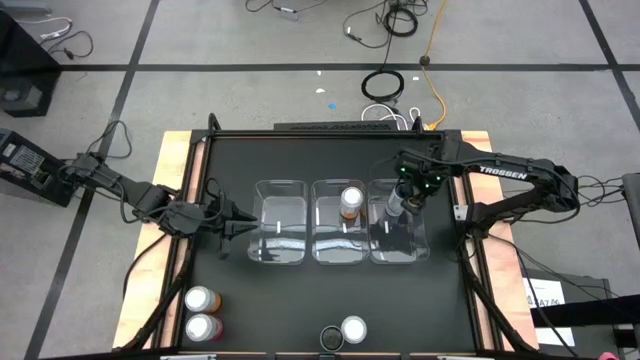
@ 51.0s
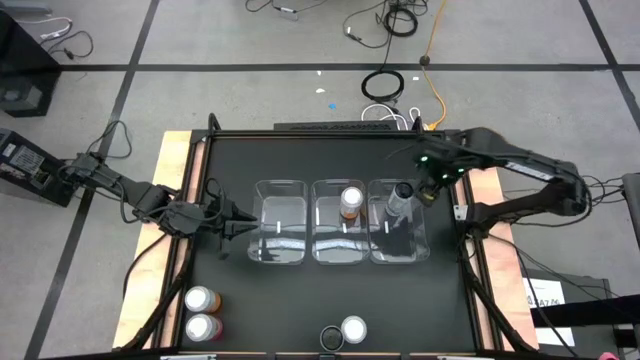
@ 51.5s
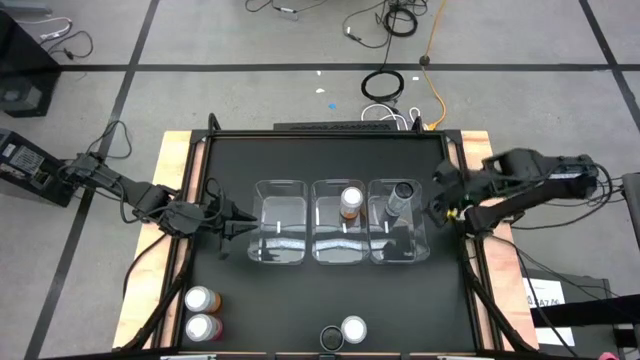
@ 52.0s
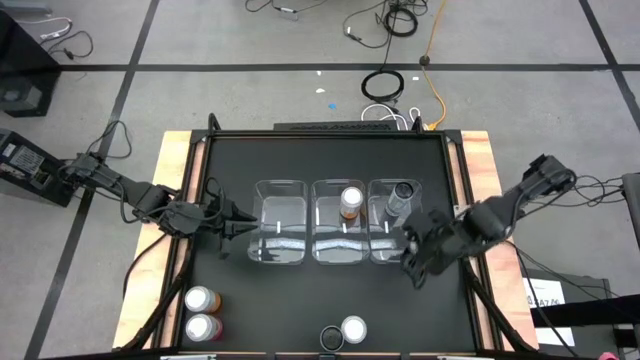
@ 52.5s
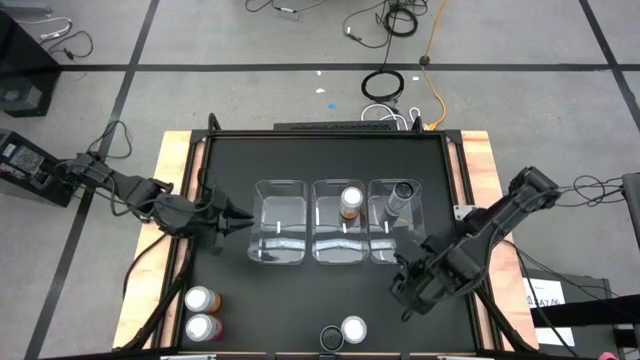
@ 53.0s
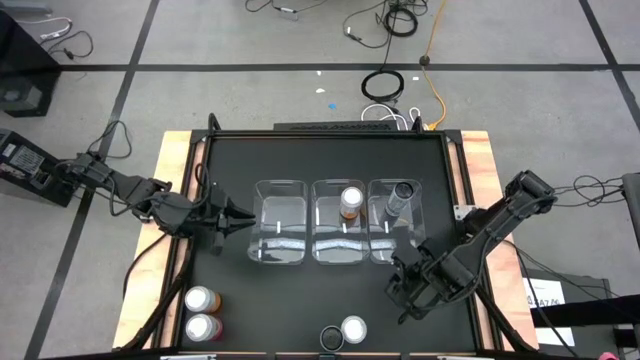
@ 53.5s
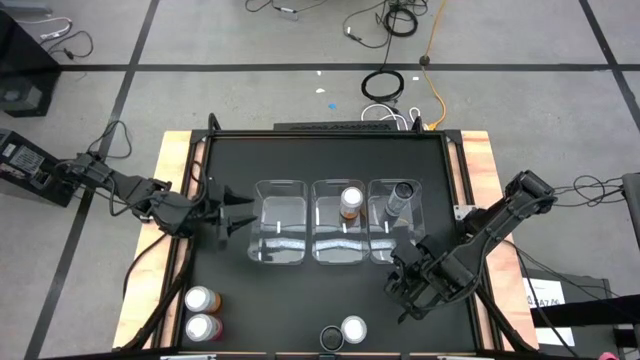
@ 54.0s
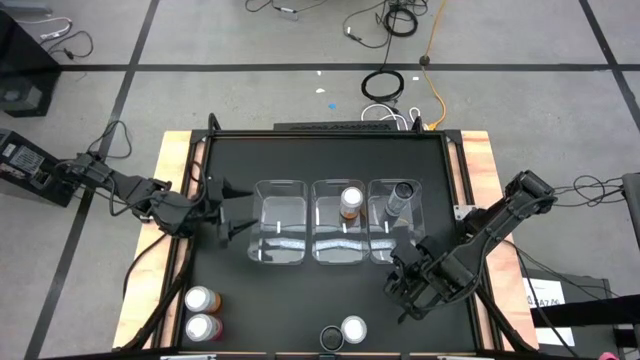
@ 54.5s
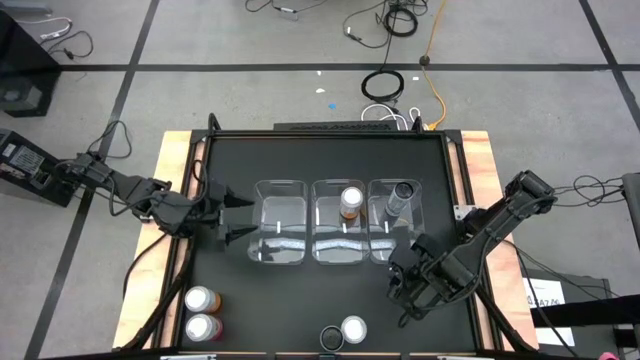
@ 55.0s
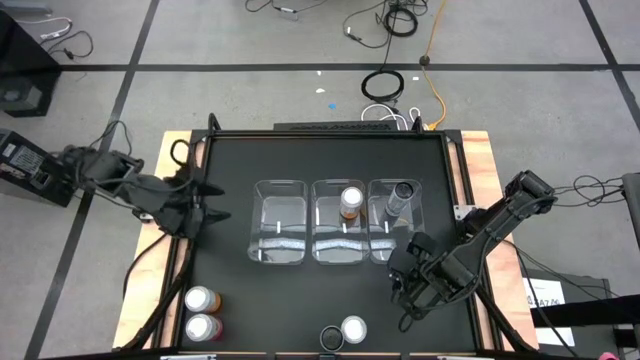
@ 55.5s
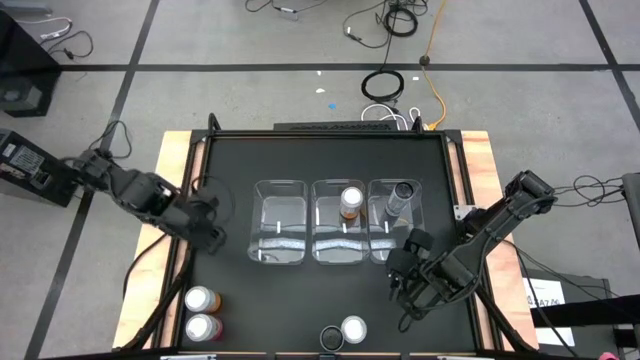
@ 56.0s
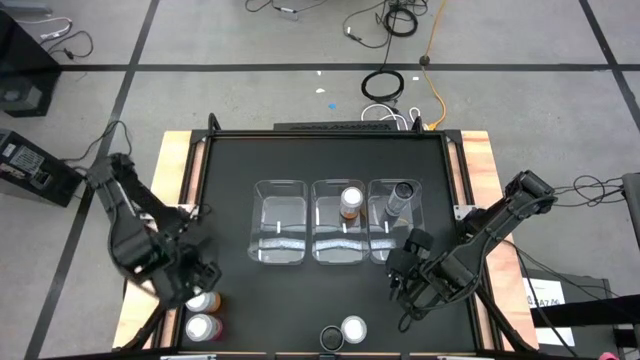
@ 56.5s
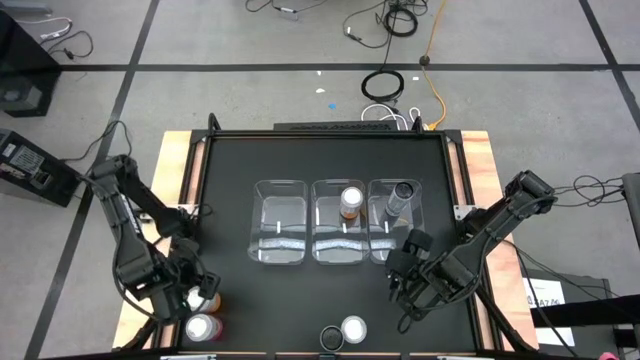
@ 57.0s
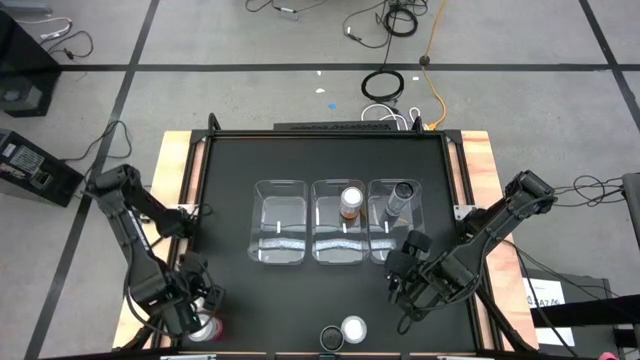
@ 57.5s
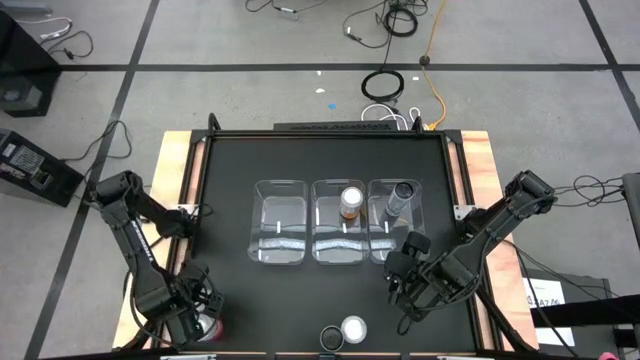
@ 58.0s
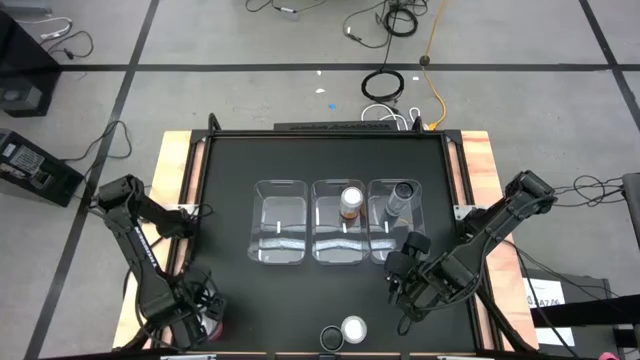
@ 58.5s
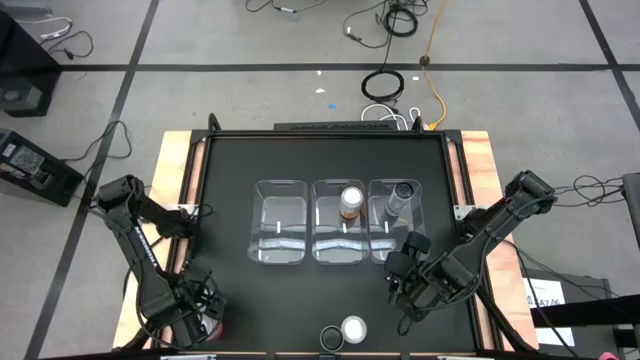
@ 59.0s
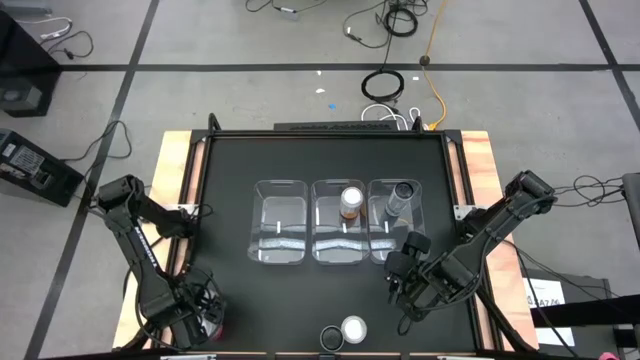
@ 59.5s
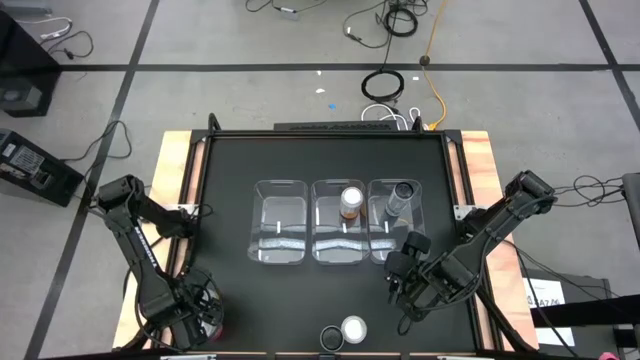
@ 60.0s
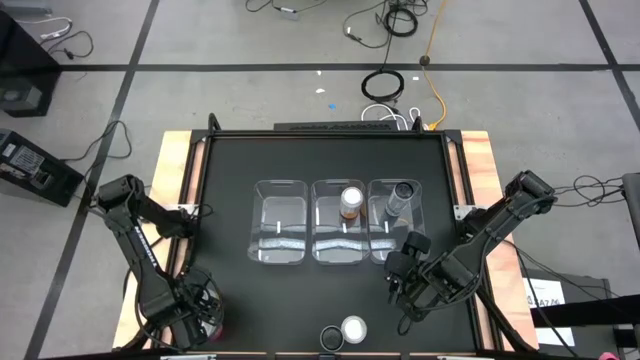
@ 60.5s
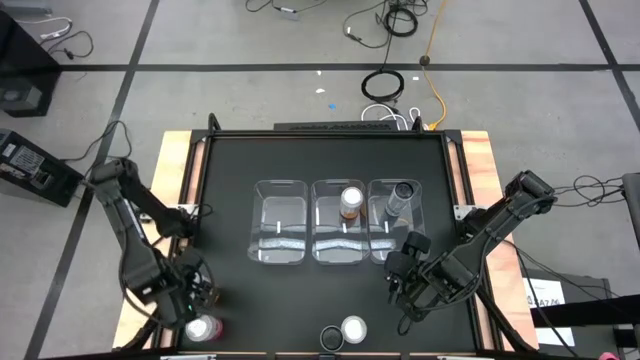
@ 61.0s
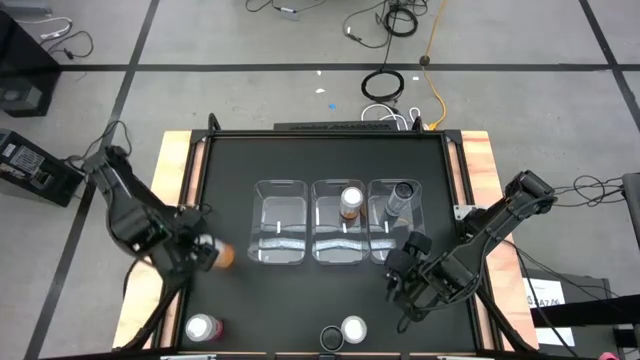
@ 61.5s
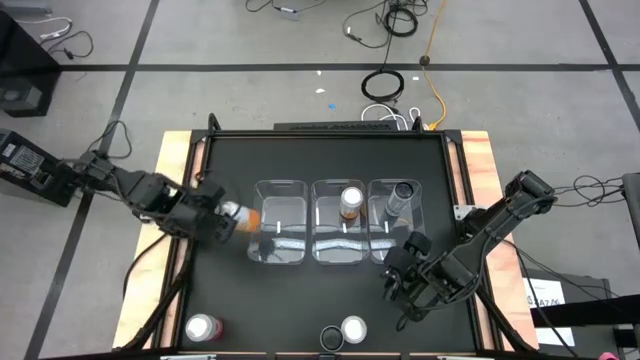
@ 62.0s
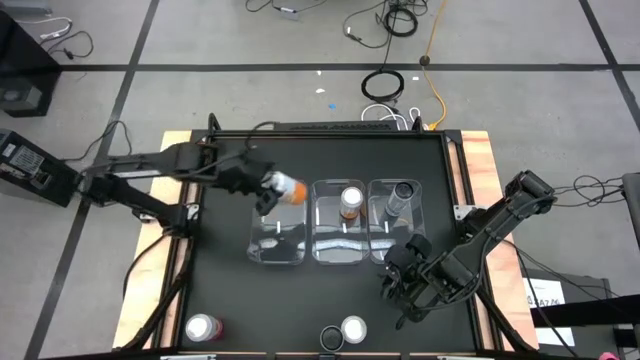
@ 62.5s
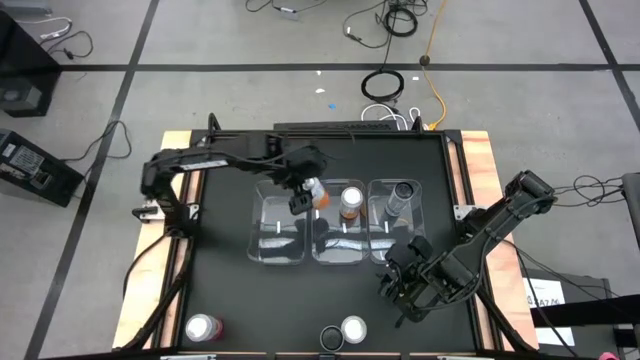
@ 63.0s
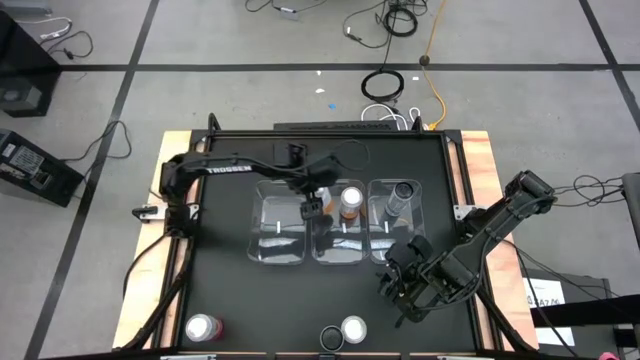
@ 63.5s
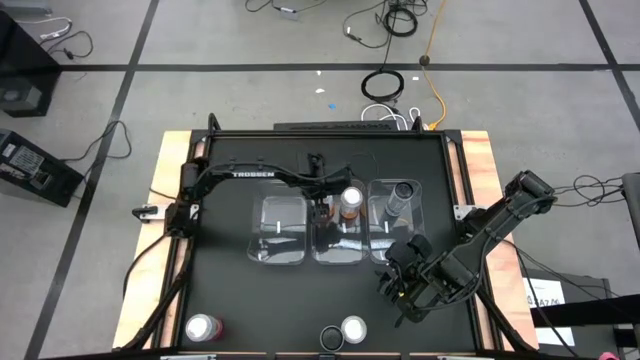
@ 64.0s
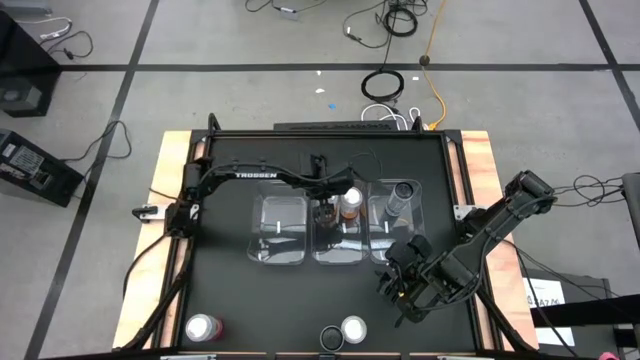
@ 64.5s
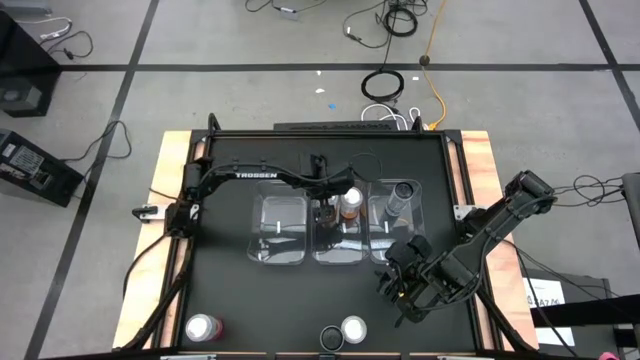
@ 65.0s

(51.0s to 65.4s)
Task: Sort soda cans
Put the yellow white soda can into the middle transparent bin
